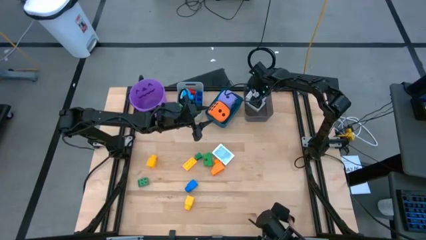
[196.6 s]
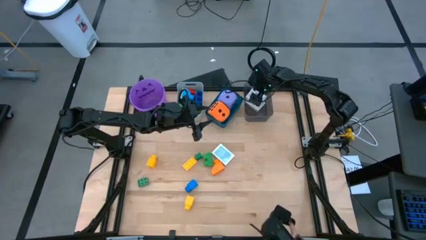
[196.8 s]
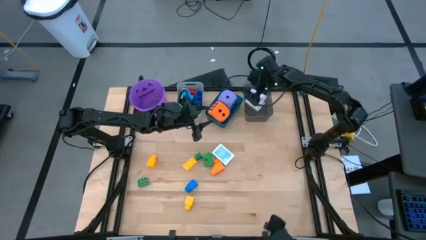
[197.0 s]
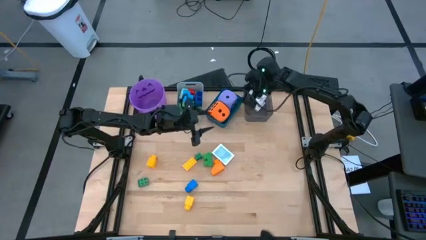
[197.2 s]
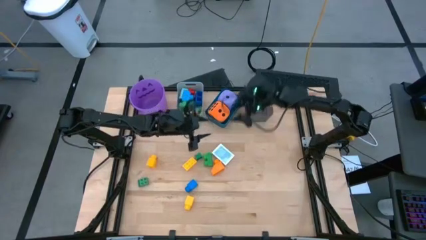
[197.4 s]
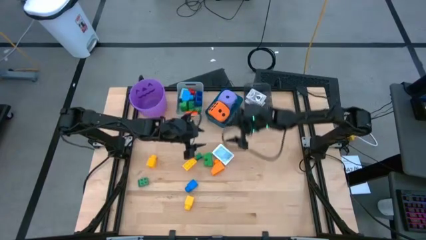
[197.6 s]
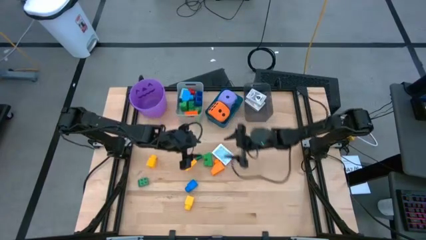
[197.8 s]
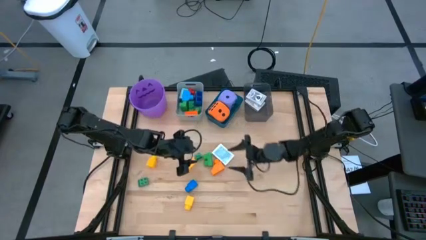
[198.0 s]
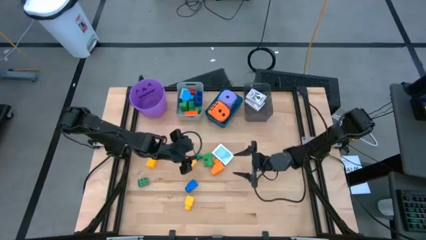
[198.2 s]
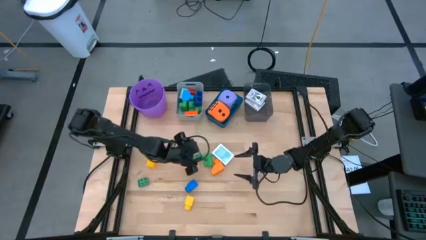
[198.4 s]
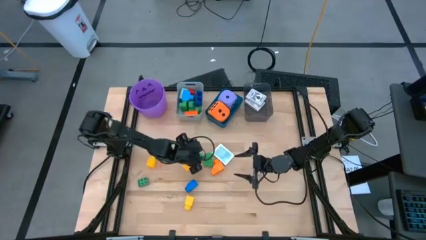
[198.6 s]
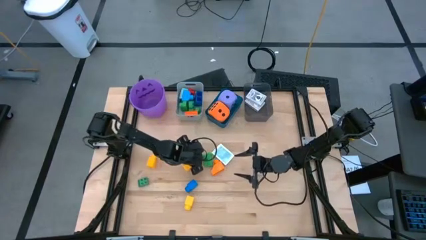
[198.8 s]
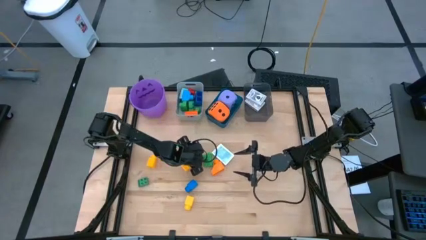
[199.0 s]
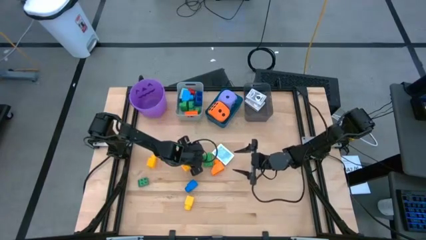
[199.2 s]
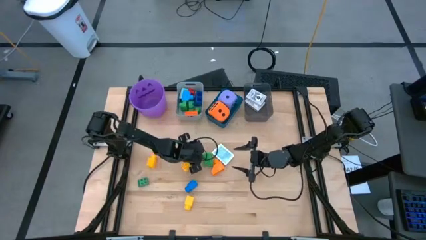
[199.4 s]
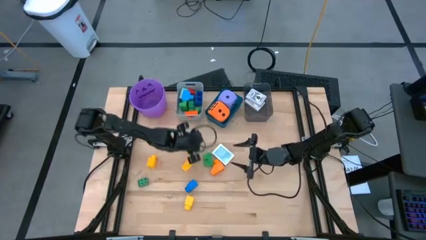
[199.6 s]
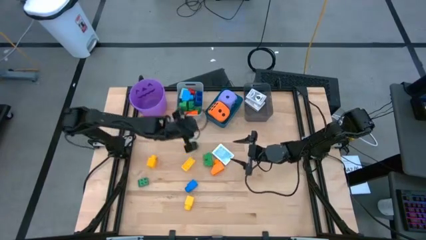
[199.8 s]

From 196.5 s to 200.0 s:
Task: Pick & Place Toys
Put the green game piece into the gray bin

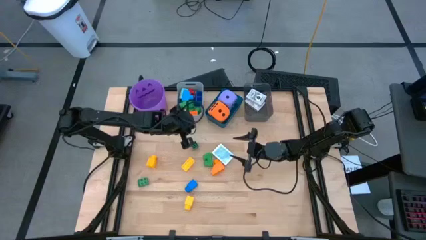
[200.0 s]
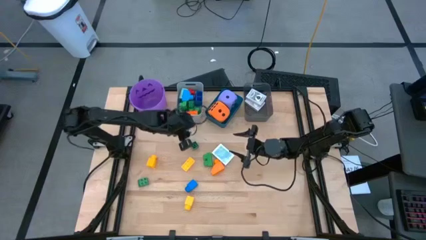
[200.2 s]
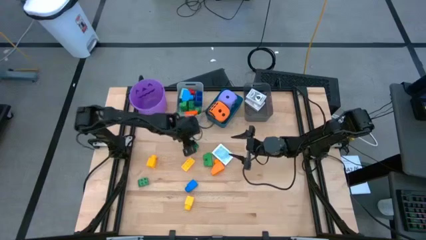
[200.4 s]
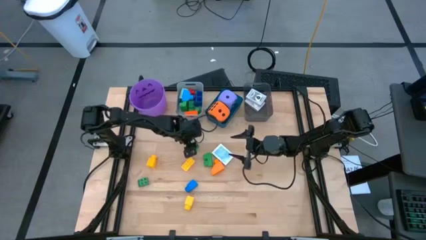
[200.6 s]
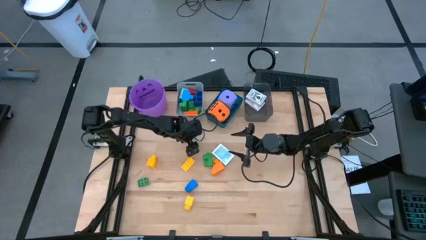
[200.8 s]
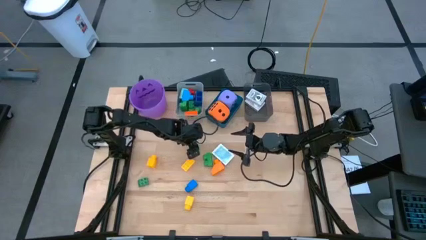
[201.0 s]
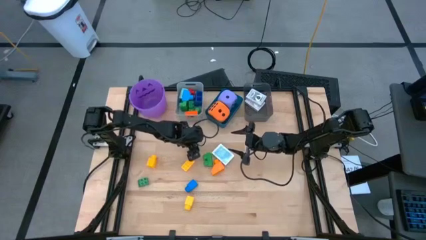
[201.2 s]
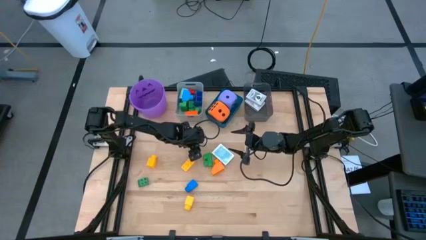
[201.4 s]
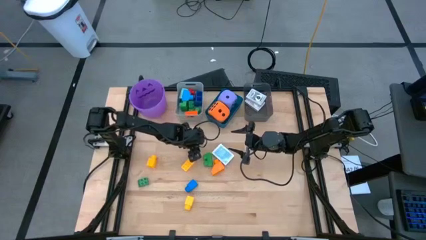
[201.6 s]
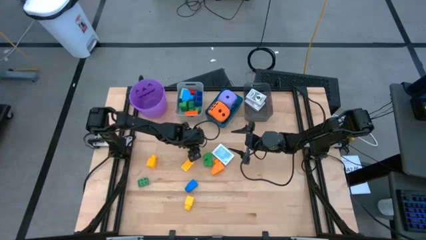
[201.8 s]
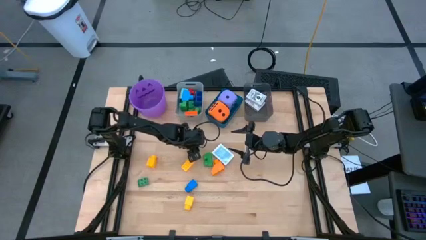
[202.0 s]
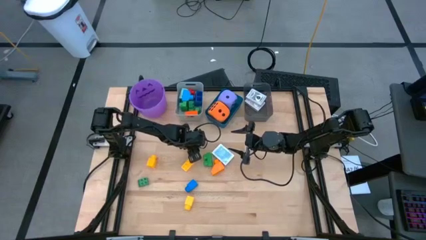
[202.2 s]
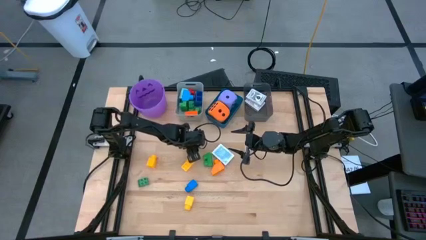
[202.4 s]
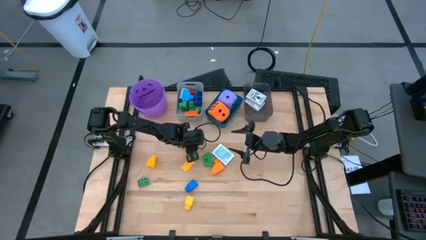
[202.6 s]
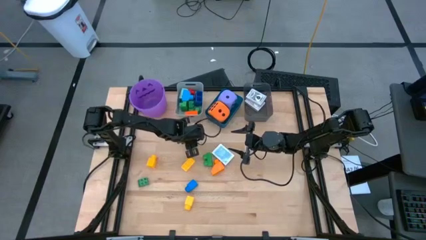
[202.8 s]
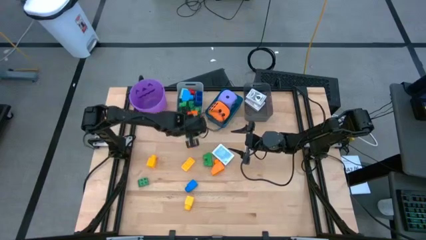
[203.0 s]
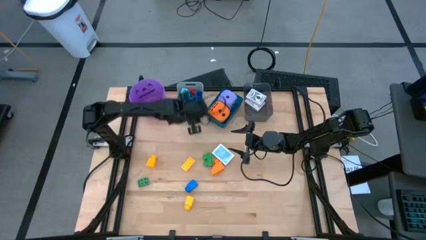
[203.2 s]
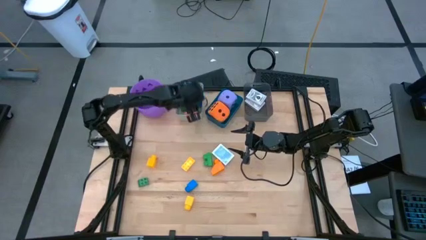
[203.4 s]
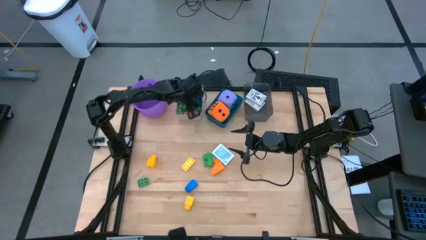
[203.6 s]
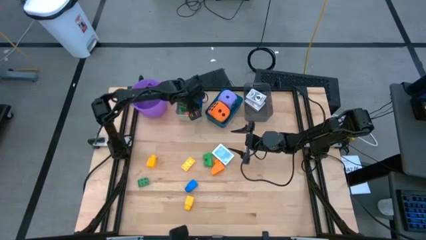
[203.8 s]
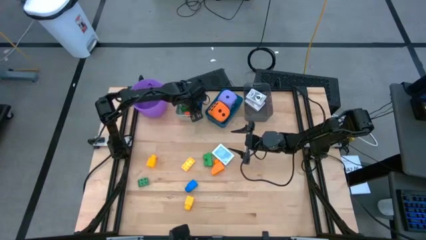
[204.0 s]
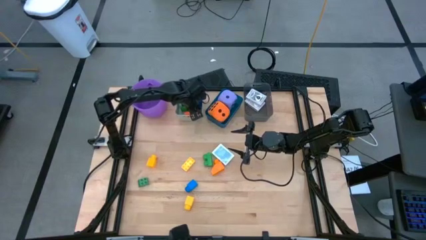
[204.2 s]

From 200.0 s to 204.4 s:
Put the green game piece into the gray bin

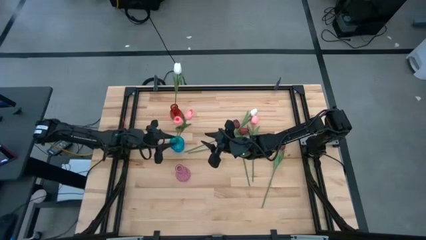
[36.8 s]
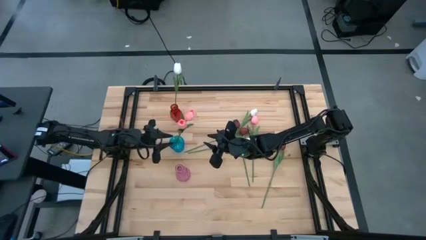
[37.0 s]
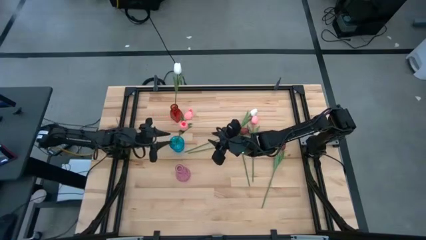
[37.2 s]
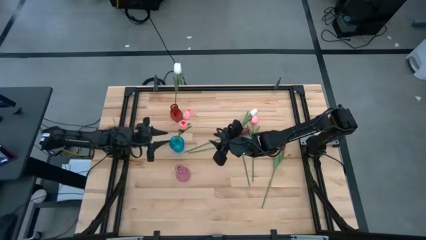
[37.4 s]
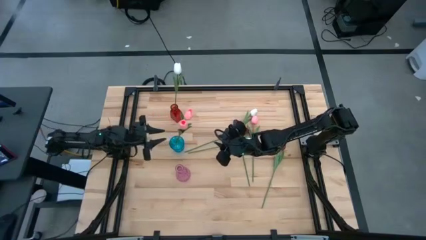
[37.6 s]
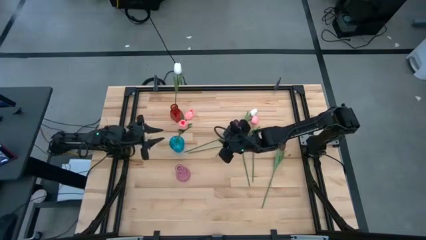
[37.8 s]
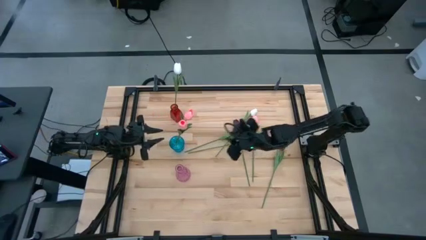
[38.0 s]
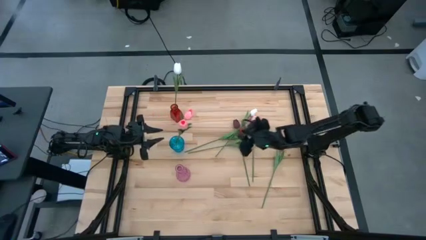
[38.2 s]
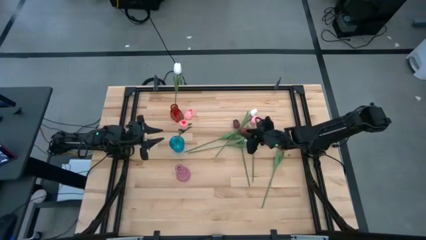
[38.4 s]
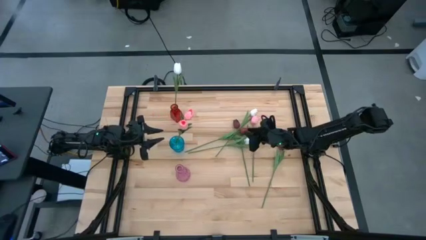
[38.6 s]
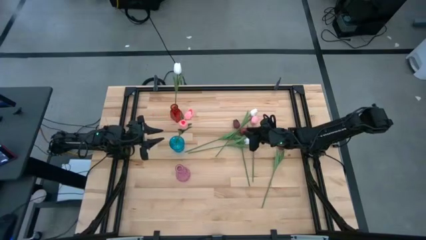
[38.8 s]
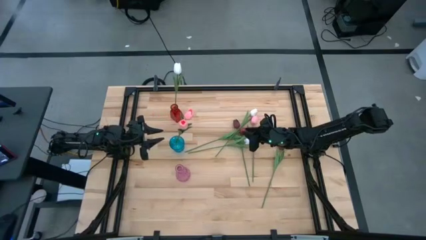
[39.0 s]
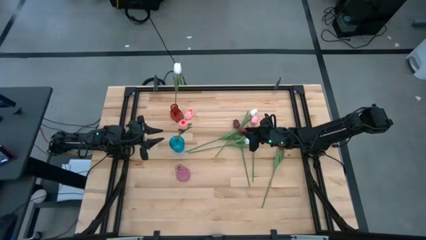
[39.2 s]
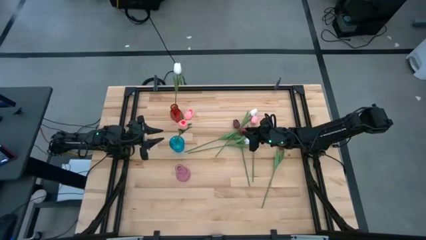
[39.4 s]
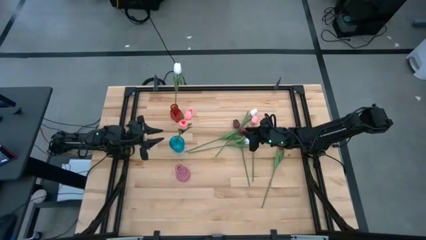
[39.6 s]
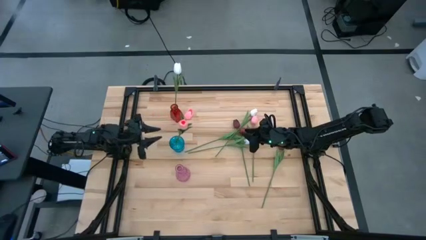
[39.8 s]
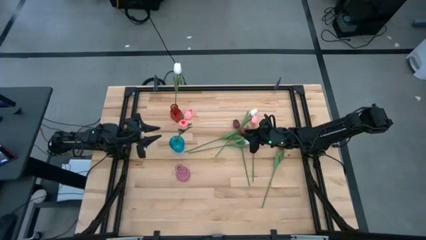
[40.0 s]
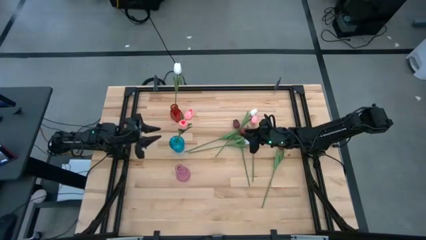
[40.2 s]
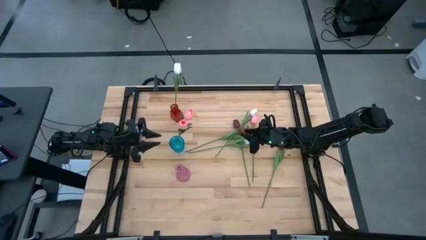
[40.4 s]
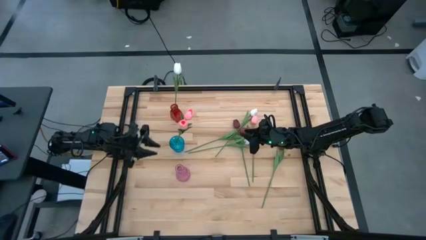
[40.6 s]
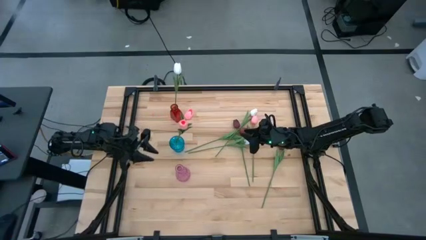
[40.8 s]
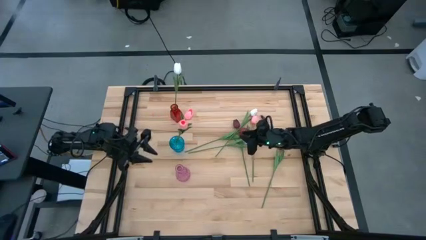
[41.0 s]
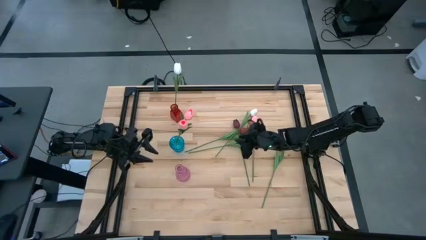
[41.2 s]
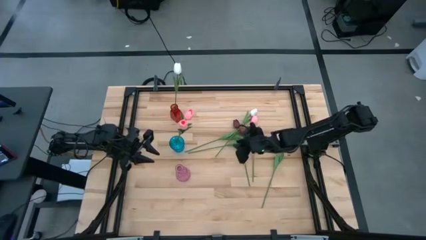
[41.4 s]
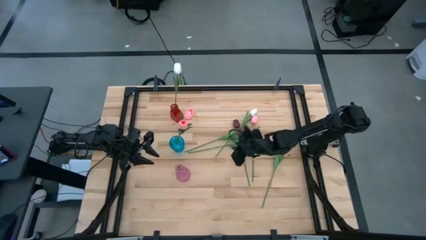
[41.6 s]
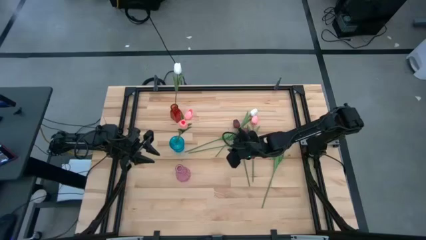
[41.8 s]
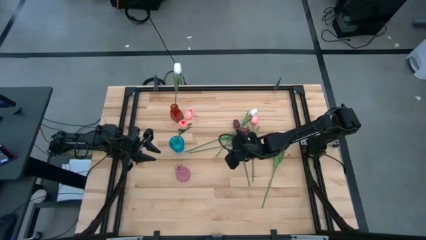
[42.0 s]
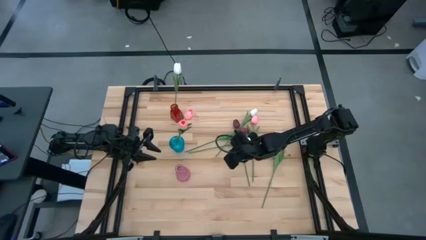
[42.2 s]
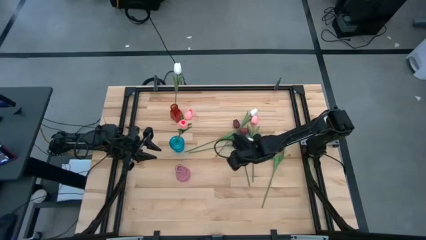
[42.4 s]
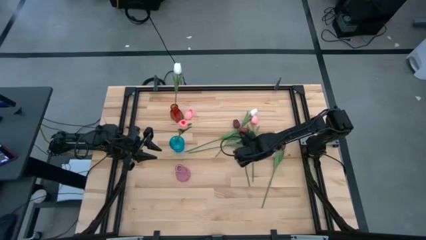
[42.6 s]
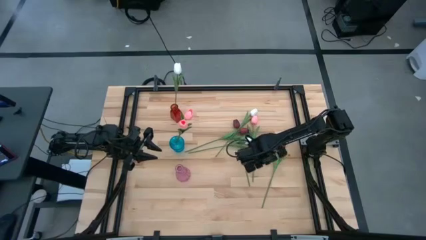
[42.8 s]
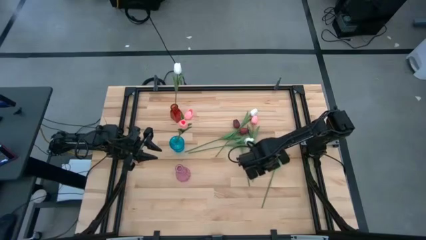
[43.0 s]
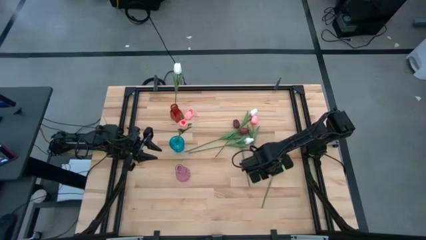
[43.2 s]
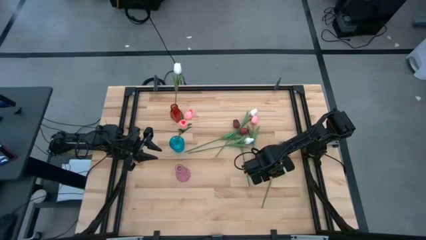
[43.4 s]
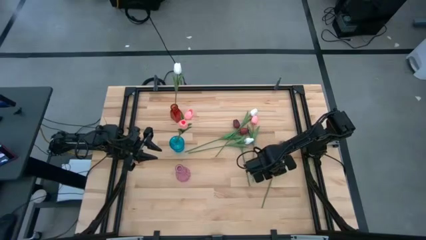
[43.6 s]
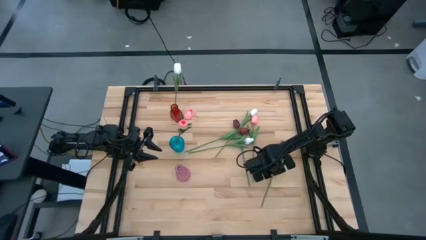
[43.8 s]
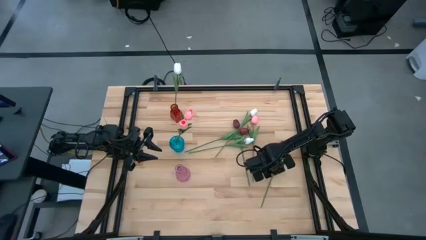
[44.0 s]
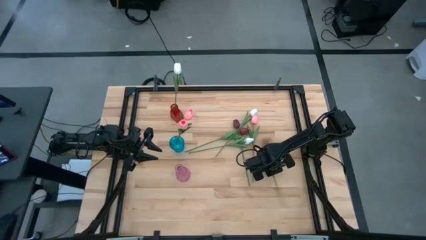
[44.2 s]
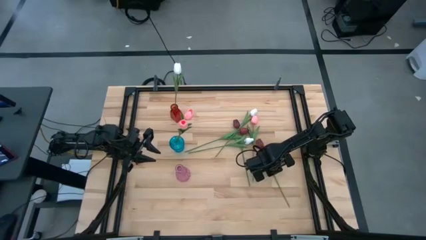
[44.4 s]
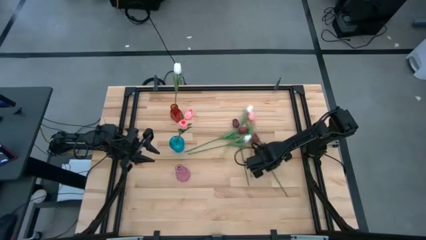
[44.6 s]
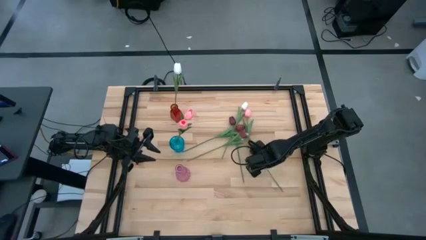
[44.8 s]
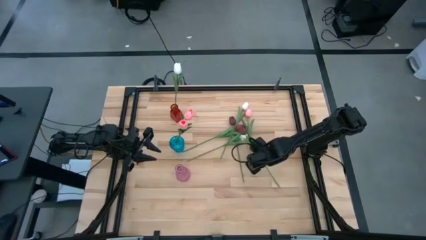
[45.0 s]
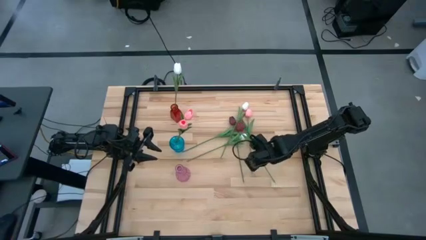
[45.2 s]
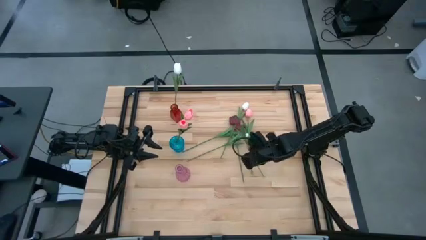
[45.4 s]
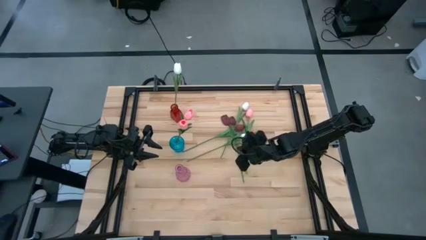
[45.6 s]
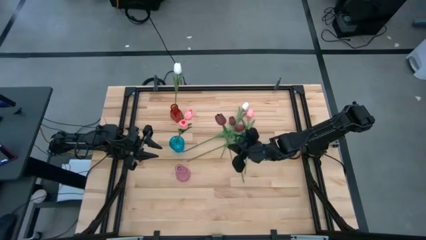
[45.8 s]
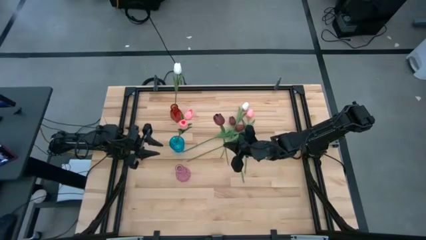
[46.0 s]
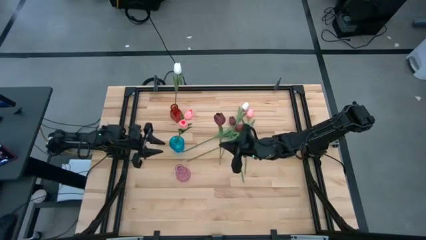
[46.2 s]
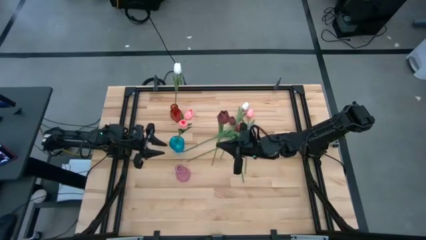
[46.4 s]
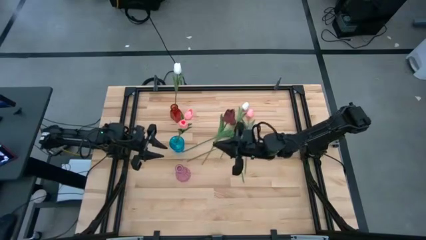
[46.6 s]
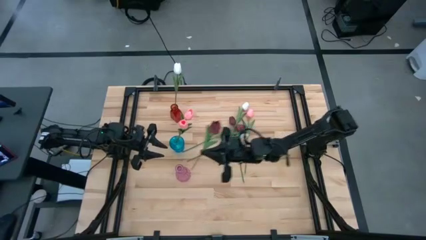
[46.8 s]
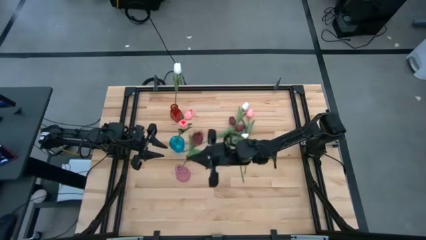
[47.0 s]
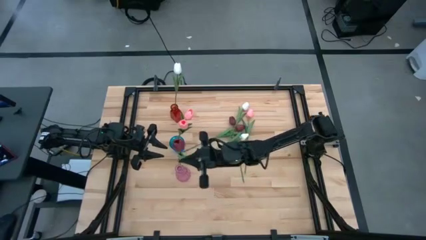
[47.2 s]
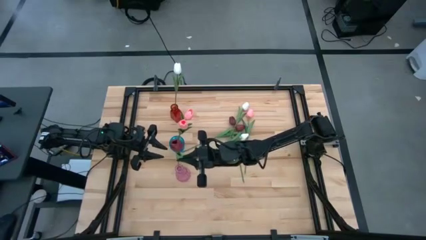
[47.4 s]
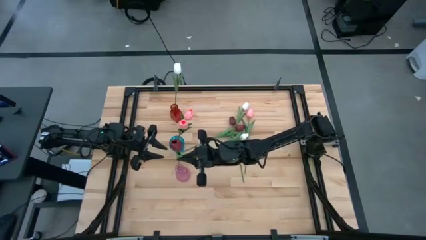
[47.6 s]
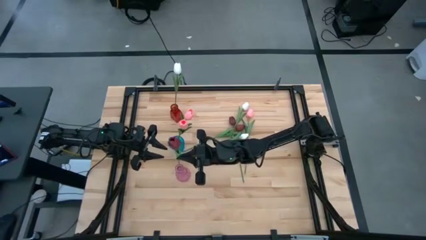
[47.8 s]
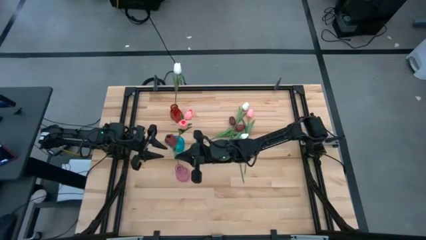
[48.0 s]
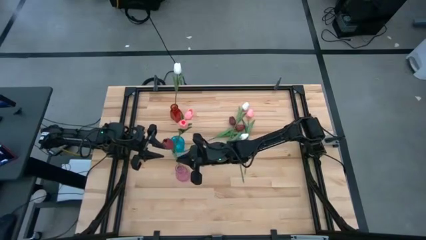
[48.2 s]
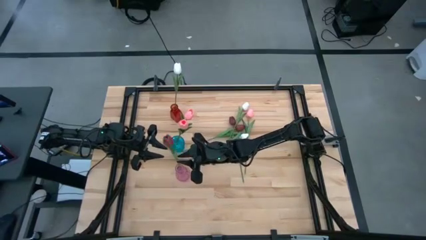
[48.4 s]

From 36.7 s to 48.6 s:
Task: Sort flowers into vase by color
Put the right red flower into the pink vase
